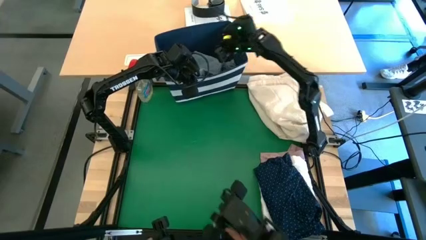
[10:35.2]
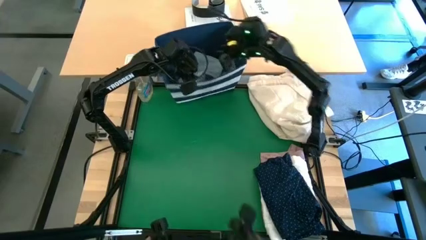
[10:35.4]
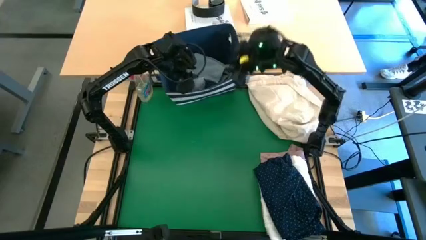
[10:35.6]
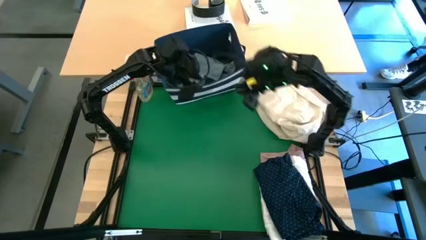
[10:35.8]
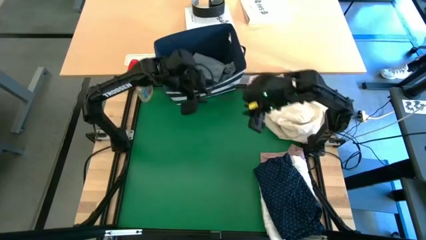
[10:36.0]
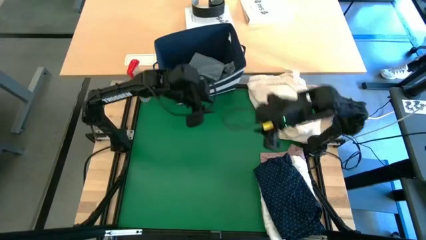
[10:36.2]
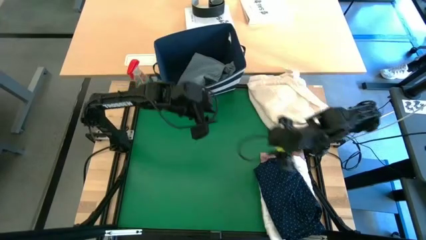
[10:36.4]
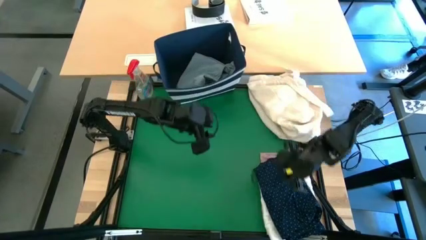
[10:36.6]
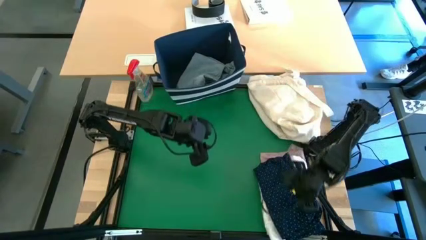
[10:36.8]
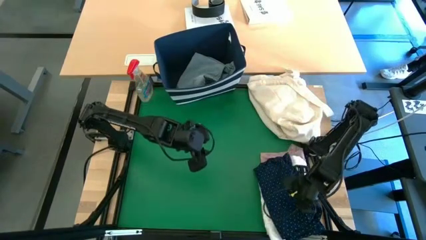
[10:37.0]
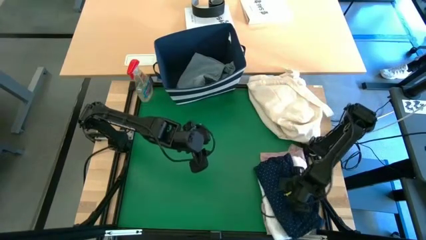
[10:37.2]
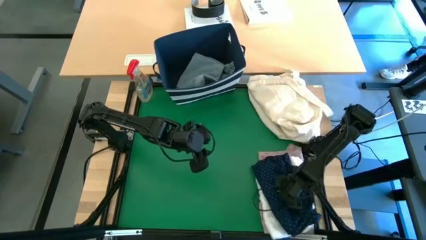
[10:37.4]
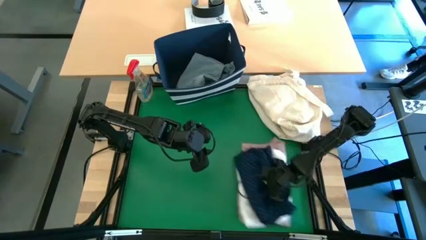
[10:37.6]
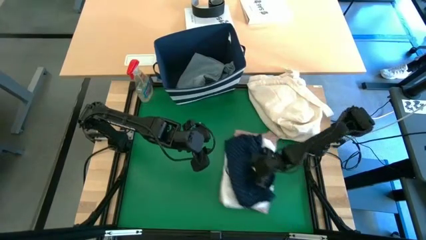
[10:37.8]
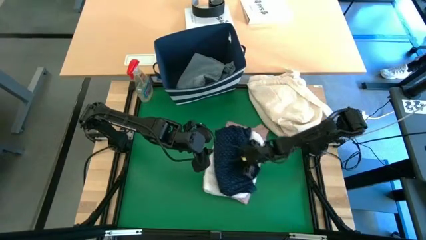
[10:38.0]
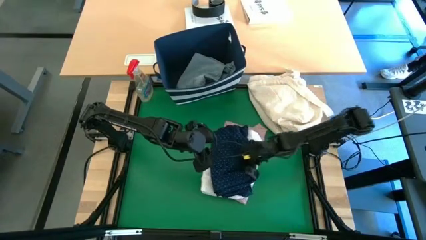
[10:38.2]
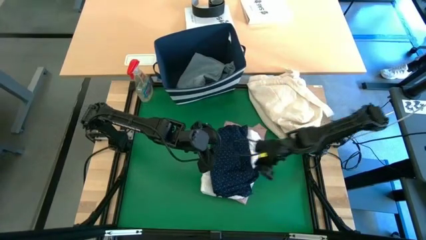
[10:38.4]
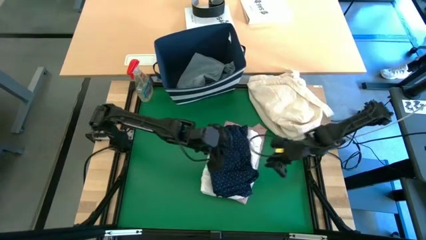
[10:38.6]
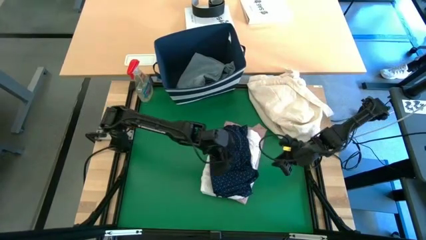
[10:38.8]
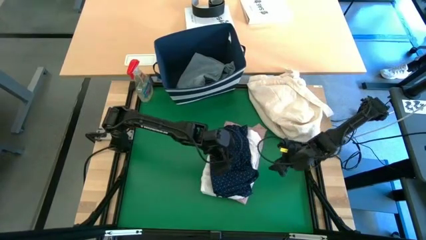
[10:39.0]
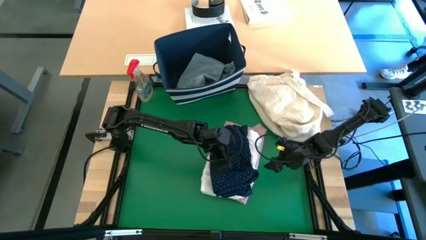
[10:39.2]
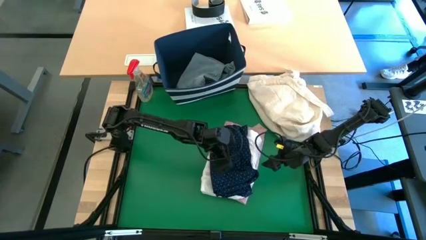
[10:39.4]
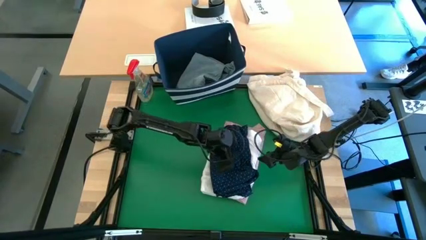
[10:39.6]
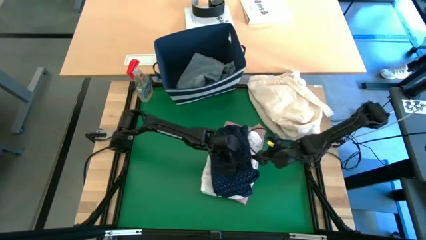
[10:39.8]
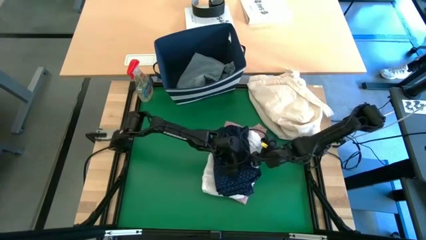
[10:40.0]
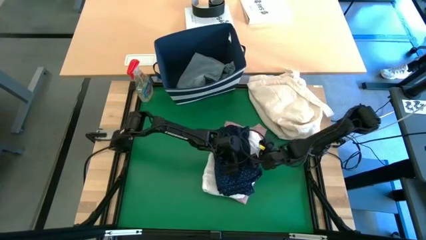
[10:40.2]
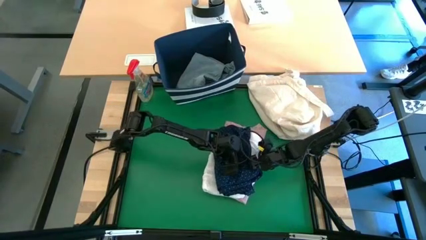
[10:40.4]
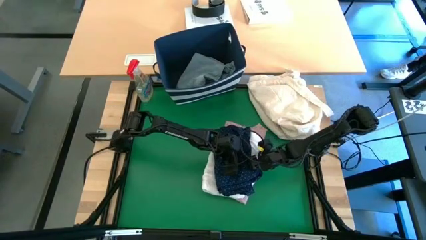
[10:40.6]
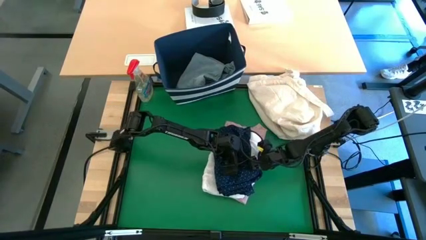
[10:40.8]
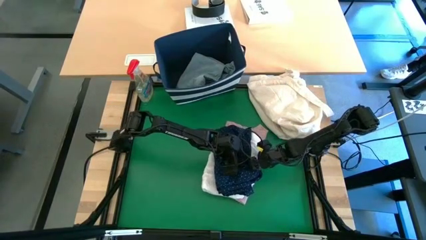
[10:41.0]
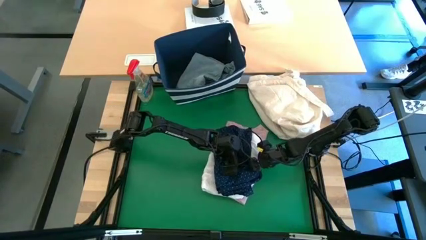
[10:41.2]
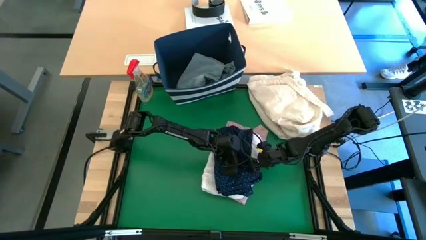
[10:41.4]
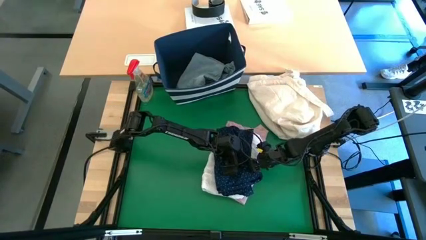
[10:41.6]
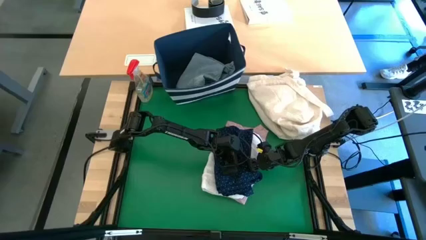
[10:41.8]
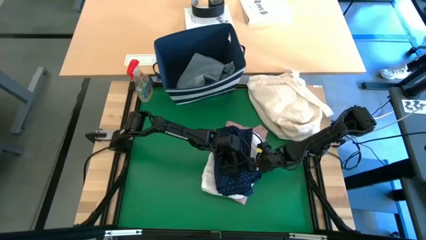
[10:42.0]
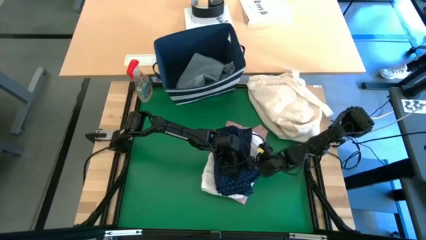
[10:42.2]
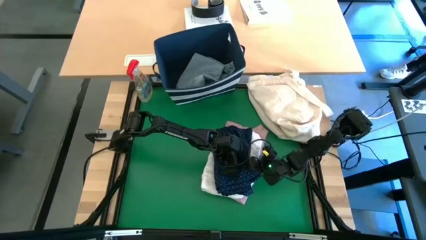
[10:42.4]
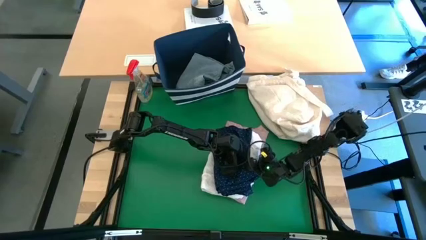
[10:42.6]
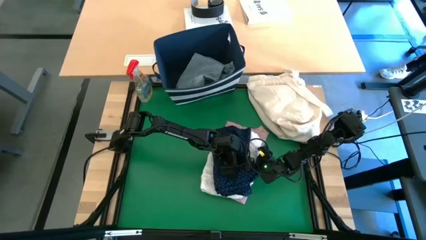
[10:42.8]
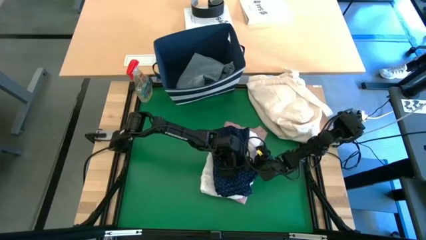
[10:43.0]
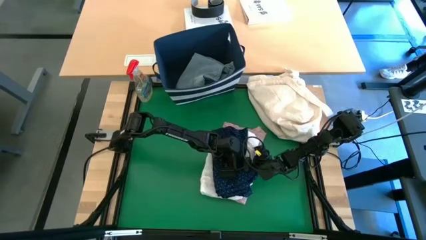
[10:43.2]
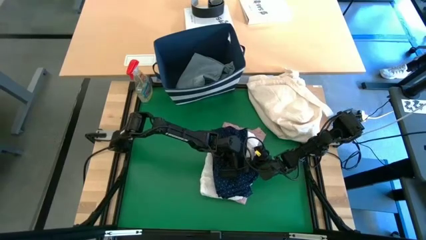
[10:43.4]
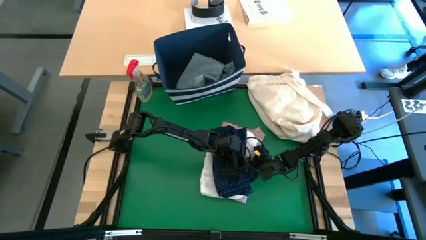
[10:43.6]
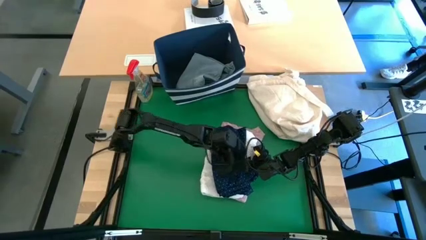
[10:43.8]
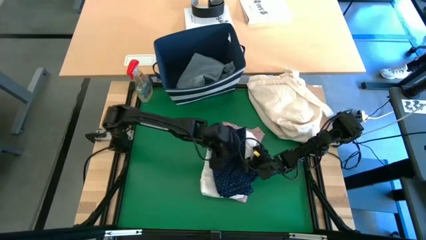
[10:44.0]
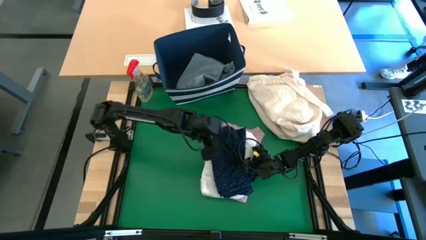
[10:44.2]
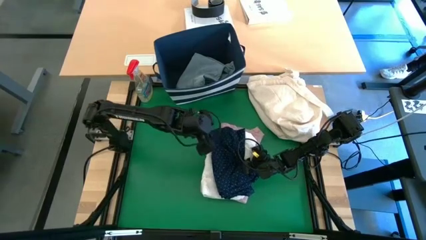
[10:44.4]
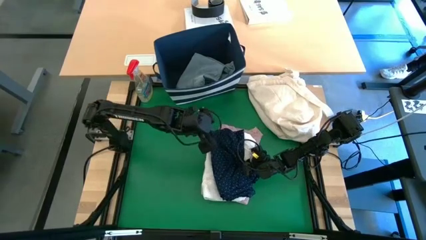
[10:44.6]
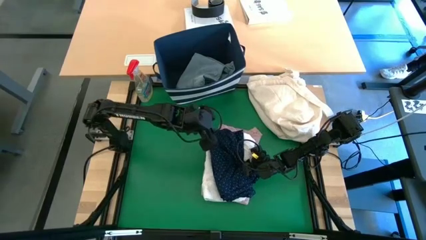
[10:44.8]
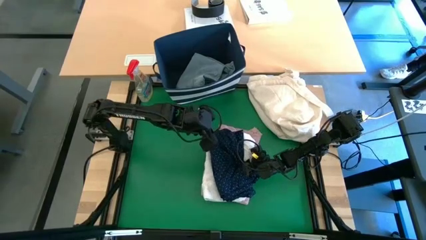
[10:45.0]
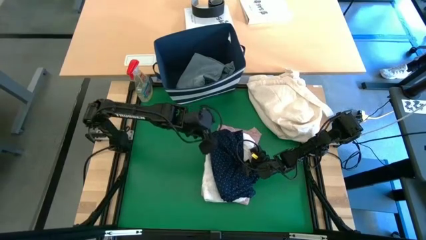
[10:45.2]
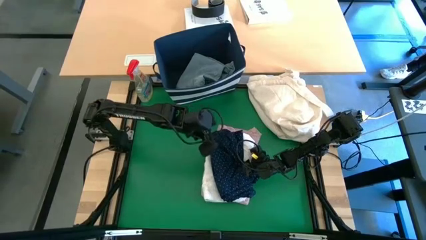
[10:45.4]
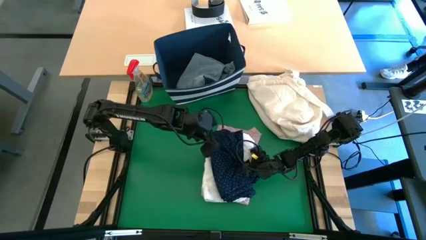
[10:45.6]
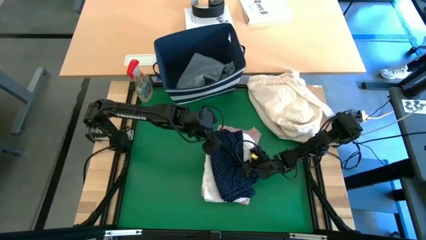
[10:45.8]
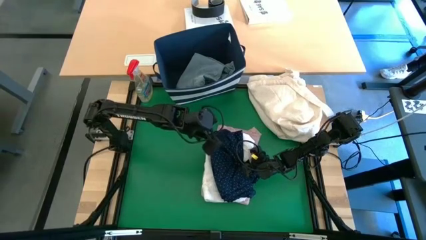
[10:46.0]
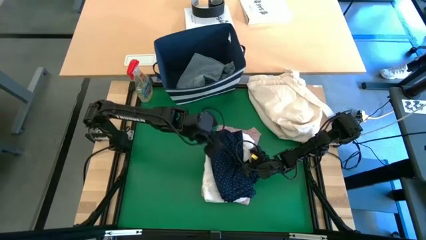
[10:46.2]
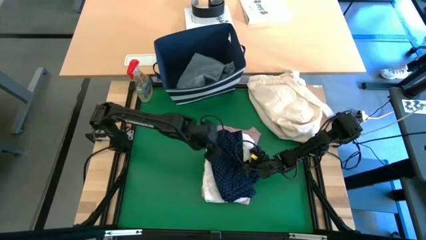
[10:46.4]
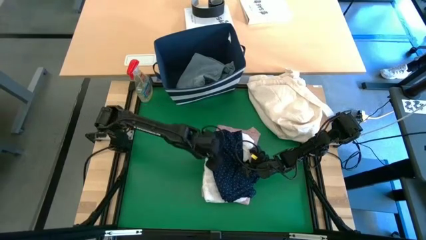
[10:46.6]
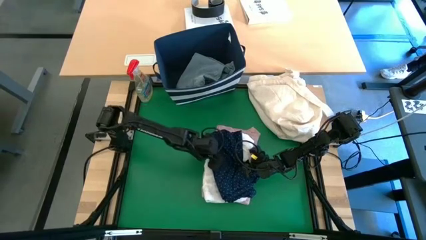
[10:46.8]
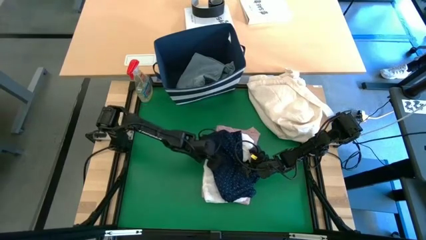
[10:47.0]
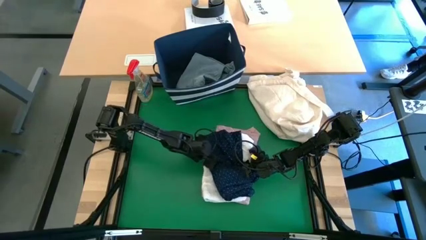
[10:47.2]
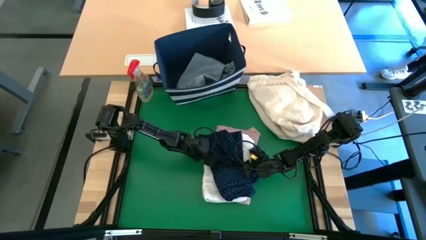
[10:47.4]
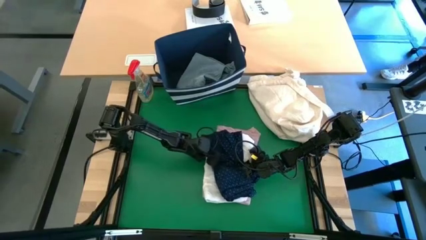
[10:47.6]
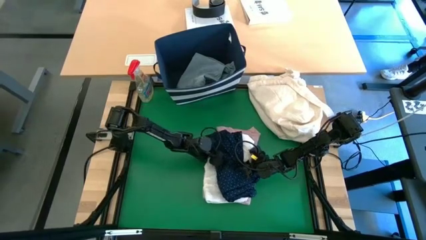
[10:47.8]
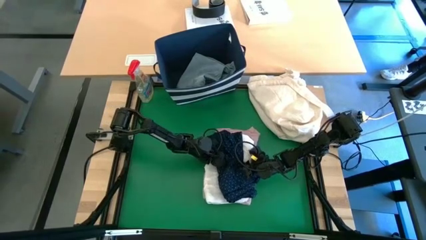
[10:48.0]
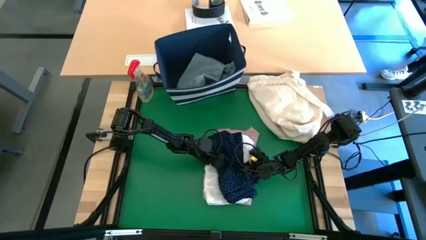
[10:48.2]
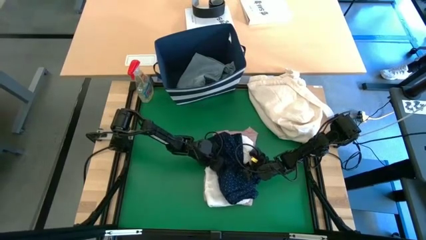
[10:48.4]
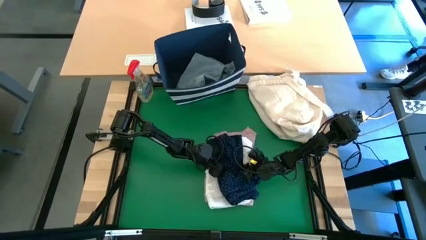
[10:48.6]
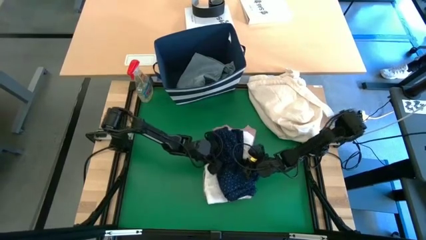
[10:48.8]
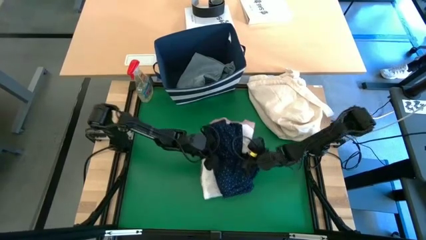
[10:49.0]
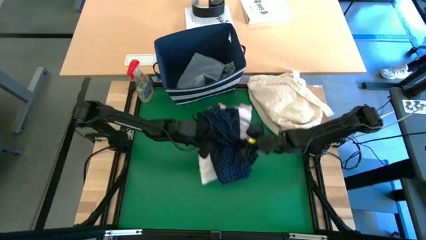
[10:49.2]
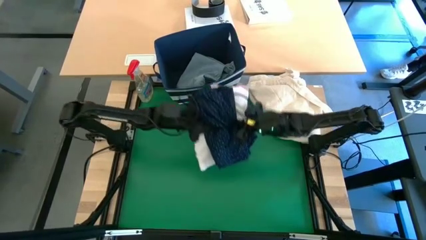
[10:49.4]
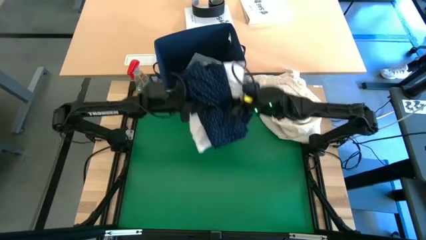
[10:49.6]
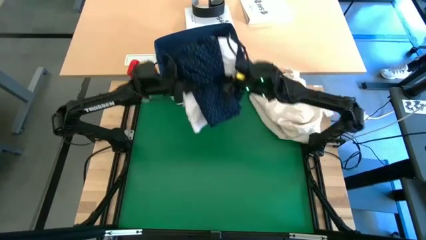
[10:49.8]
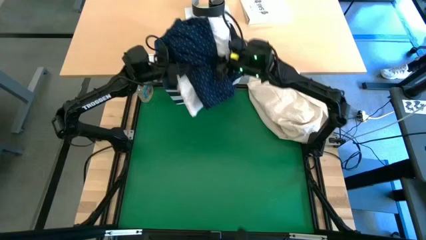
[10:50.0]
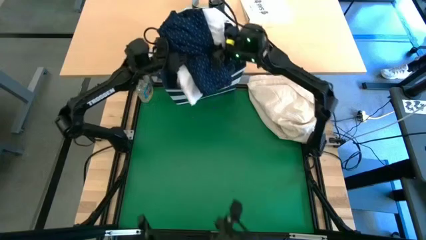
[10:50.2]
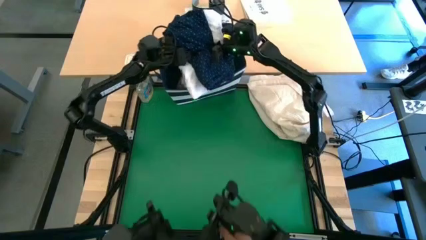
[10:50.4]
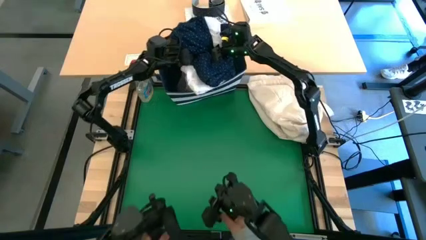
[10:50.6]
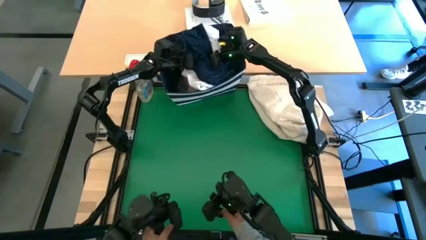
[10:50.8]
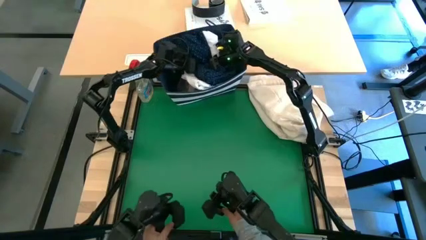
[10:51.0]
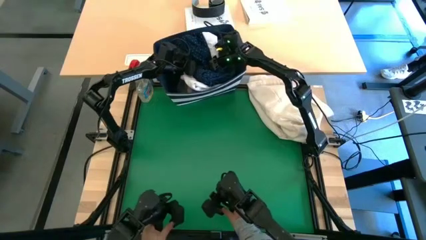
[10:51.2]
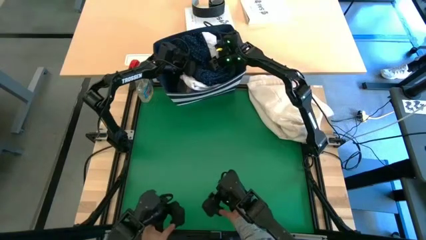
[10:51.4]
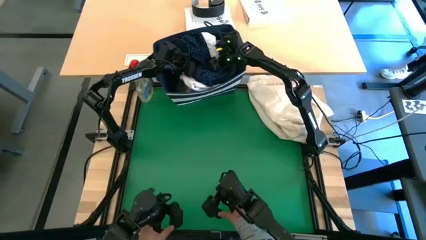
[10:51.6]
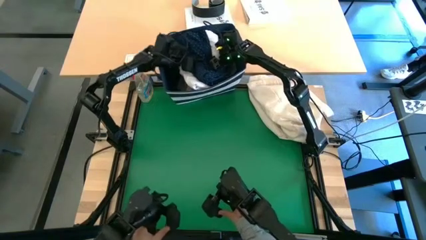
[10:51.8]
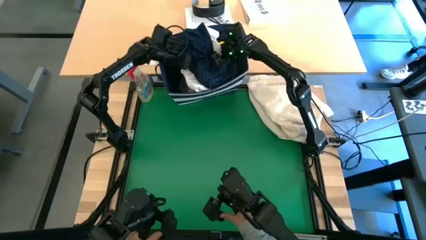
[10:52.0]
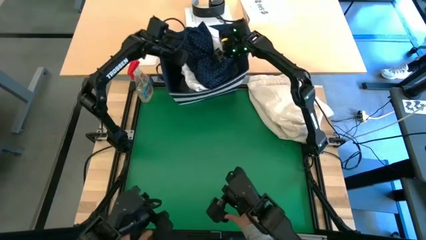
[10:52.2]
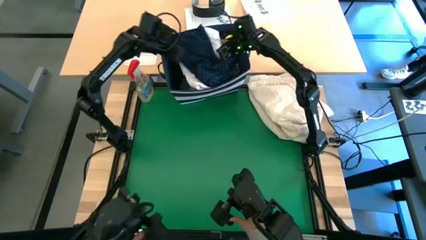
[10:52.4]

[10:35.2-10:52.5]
Task: Fold laundry
Put the stacked polos into the blue laundry bin
